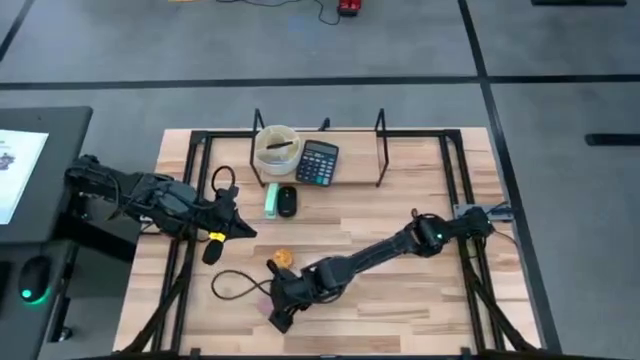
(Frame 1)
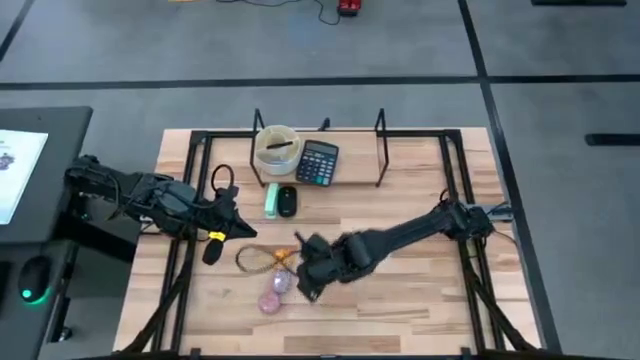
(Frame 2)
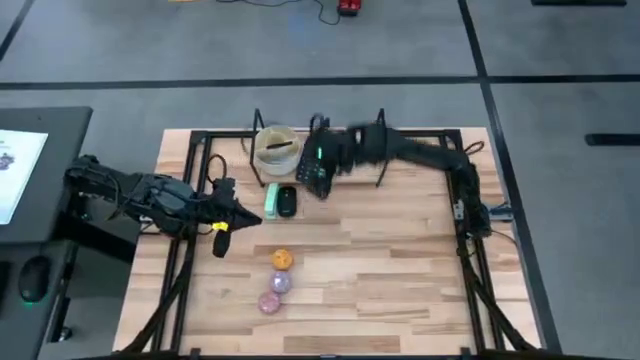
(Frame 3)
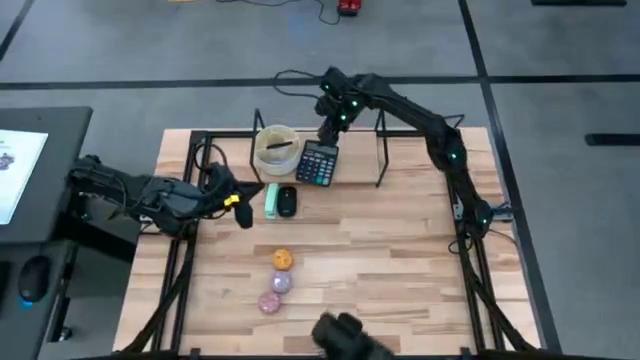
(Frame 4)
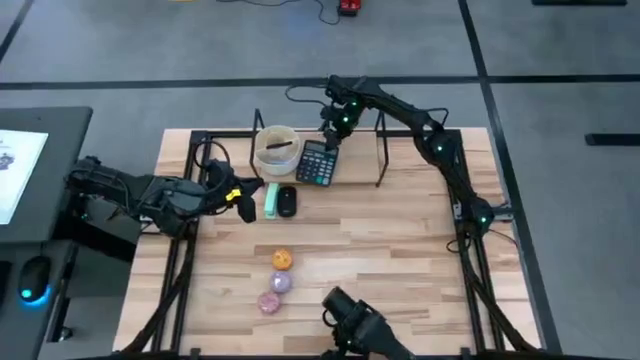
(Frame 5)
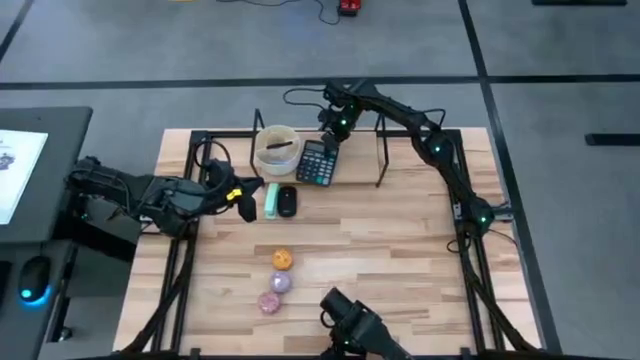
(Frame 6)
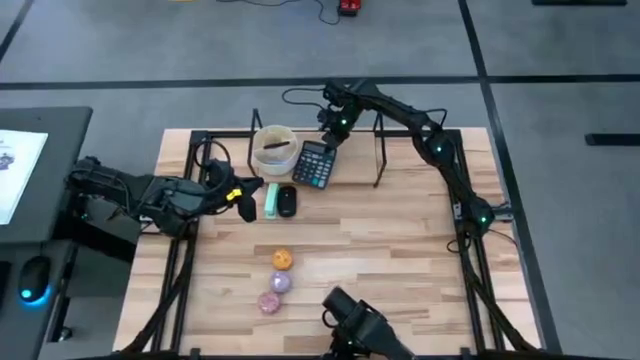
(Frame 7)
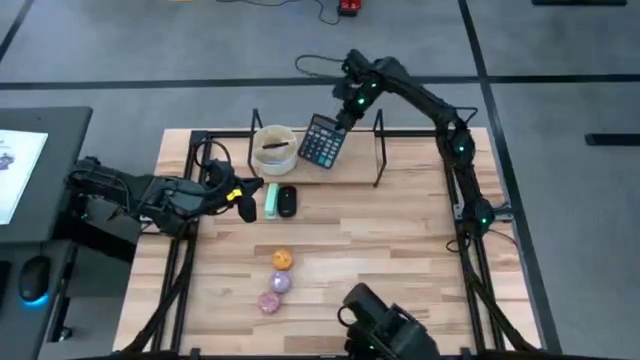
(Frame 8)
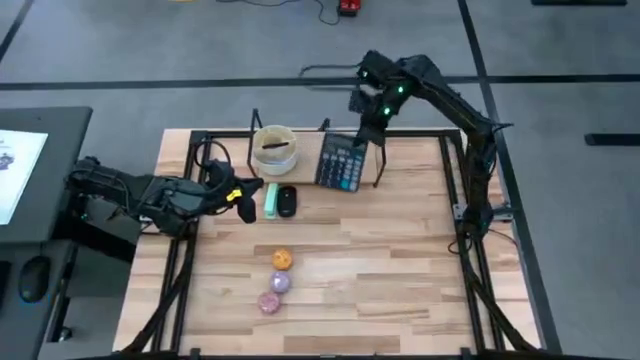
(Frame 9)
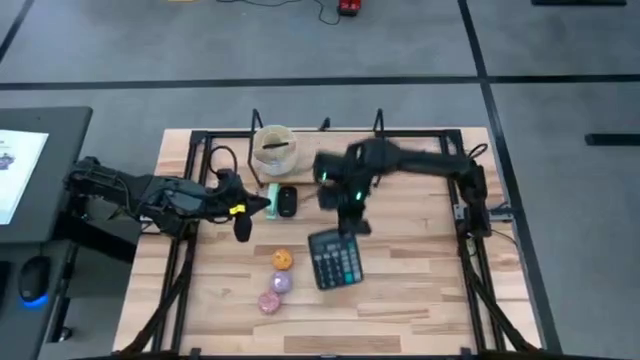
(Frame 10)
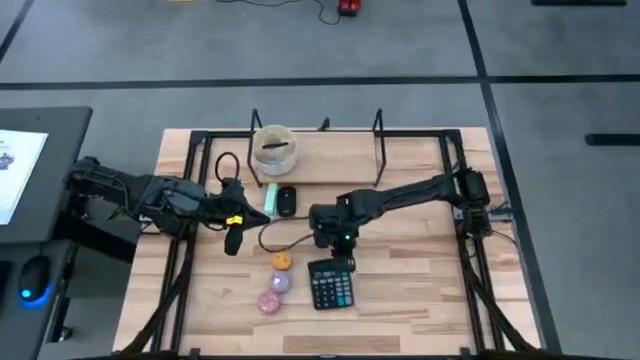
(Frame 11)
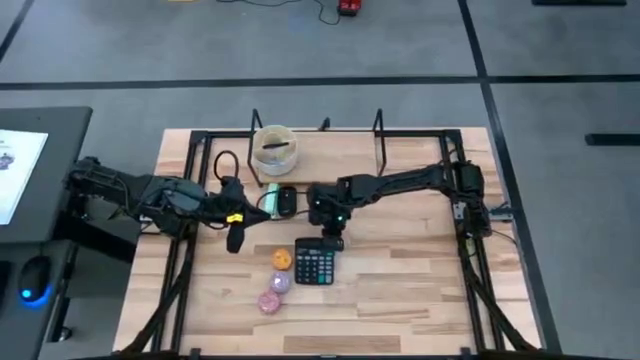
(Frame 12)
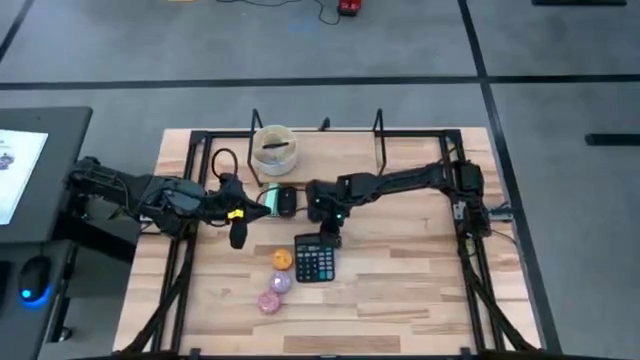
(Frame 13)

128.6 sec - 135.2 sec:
Task: Stock shelves
Remove the black calculator from the shelf

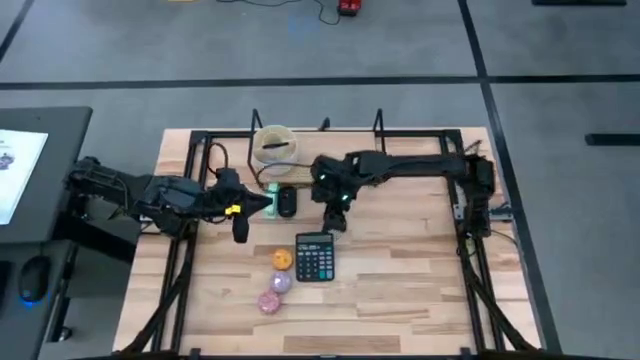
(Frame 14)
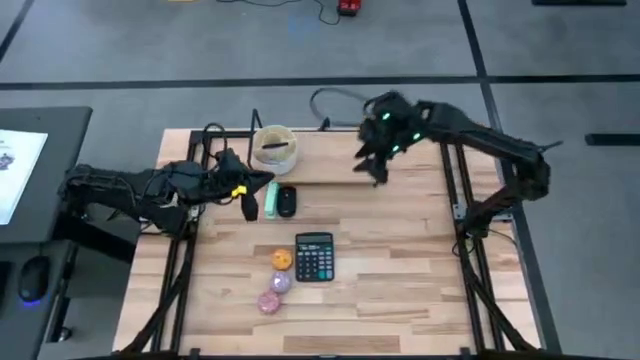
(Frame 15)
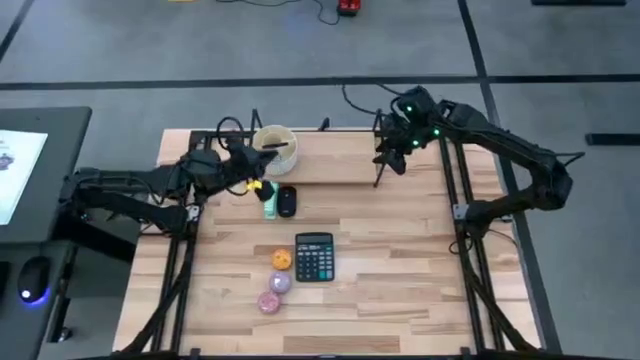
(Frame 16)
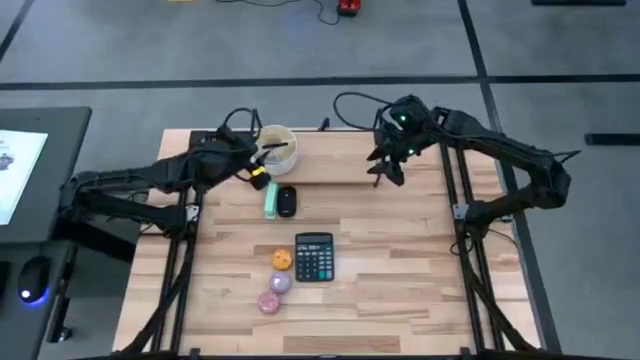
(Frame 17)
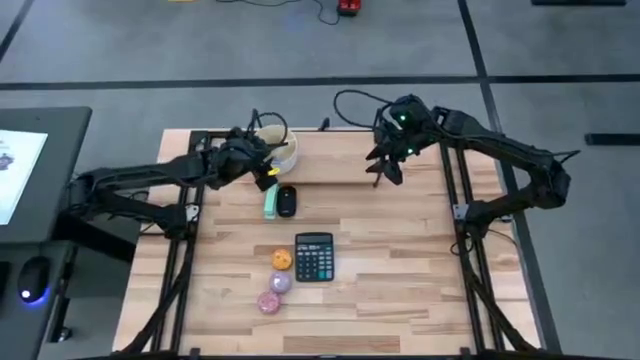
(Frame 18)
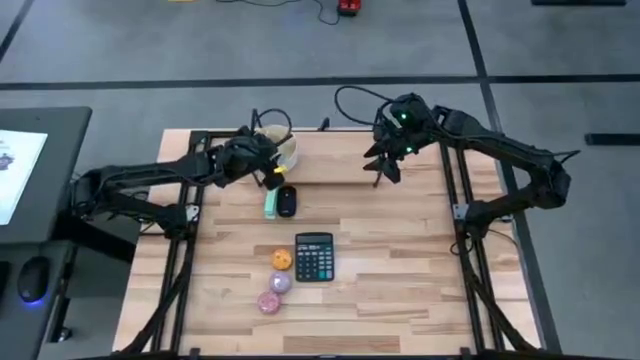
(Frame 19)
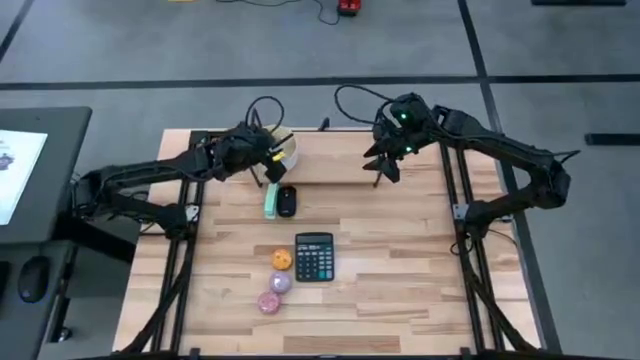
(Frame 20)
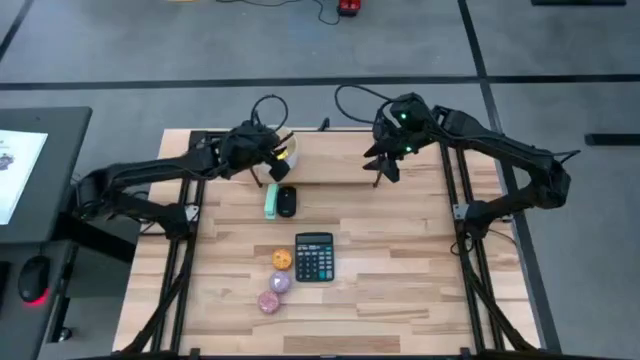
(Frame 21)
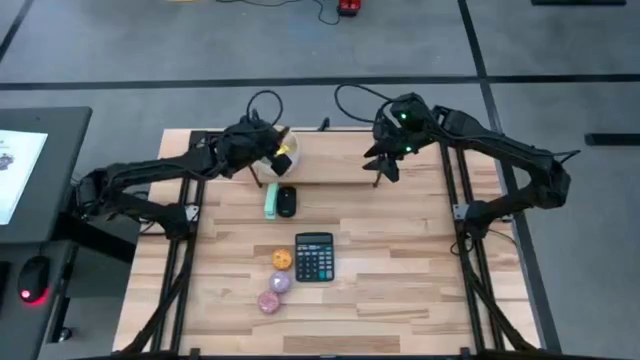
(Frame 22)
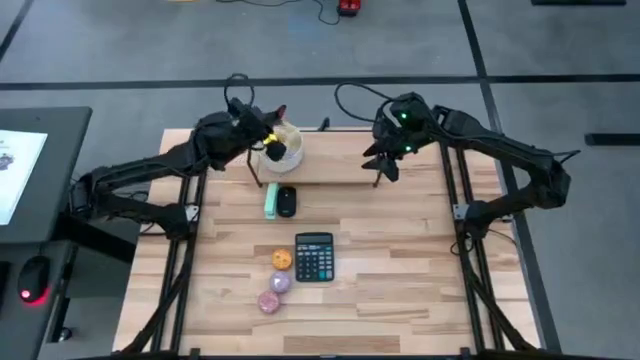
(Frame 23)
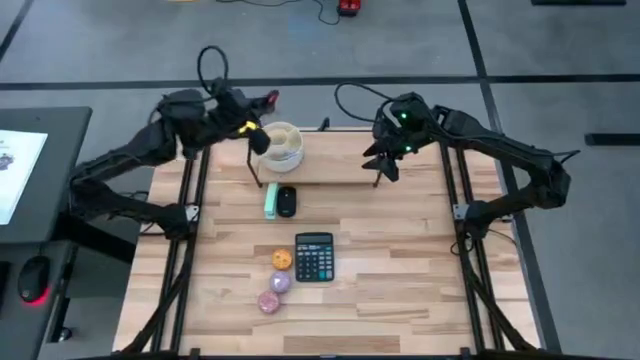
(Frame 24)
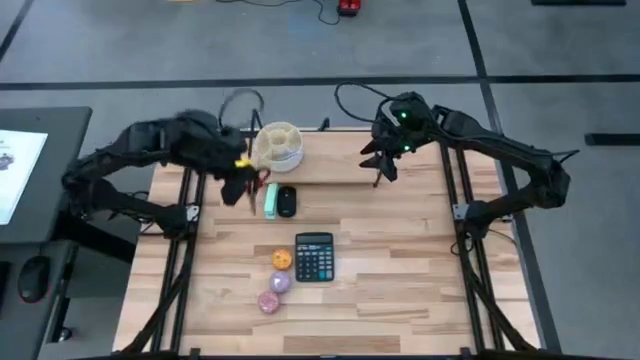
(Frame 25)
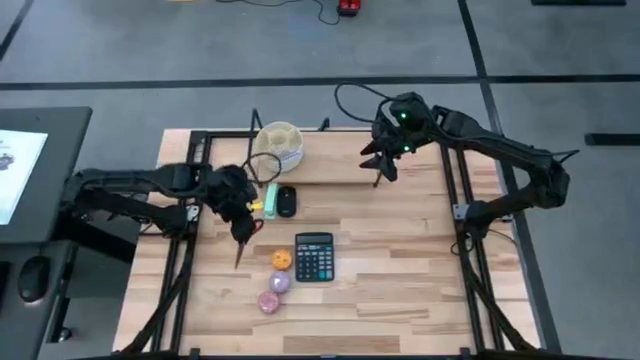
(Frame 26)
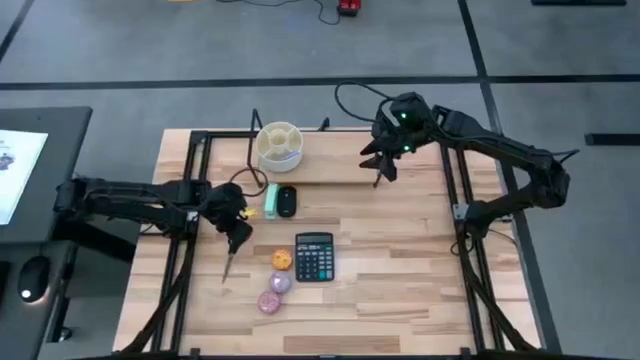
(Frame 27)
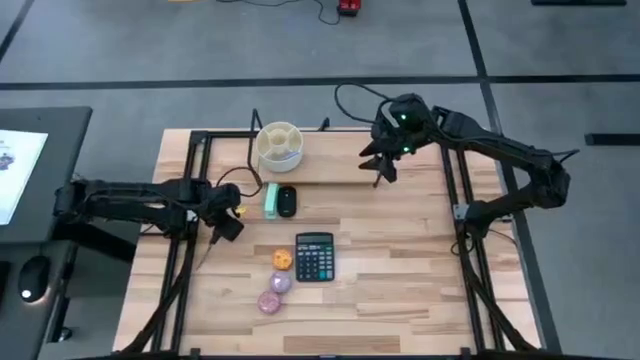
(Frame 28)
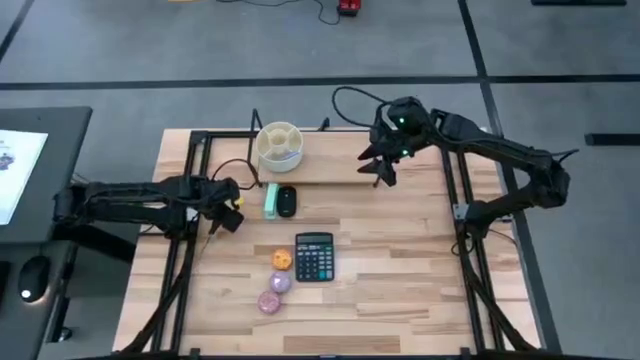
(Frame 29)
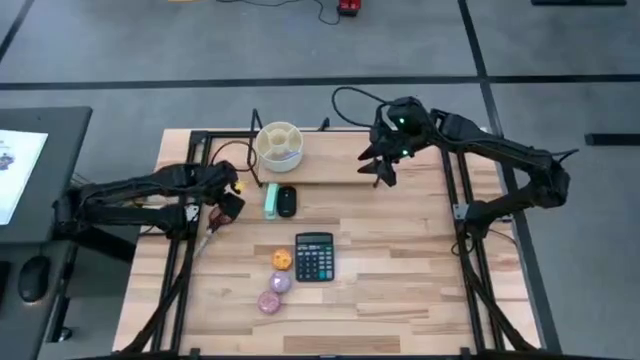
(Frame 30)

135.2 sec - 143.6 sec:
Remove the black scissors from the white pen organizer

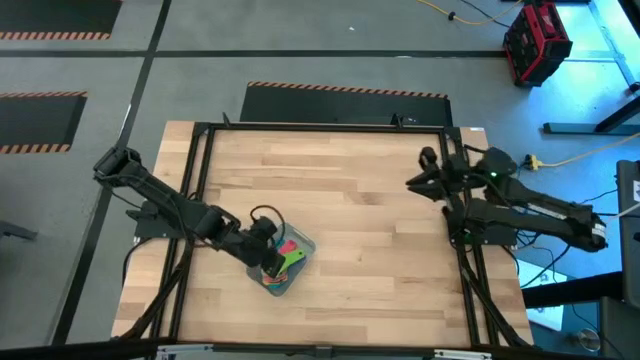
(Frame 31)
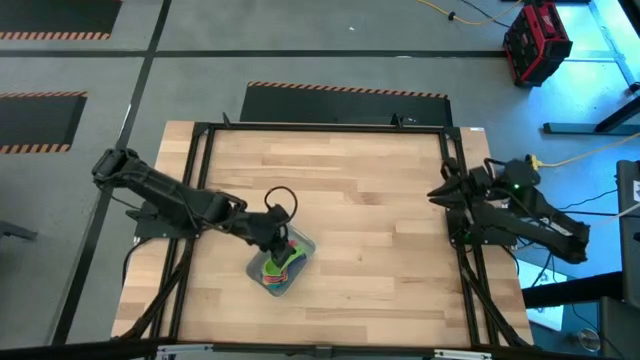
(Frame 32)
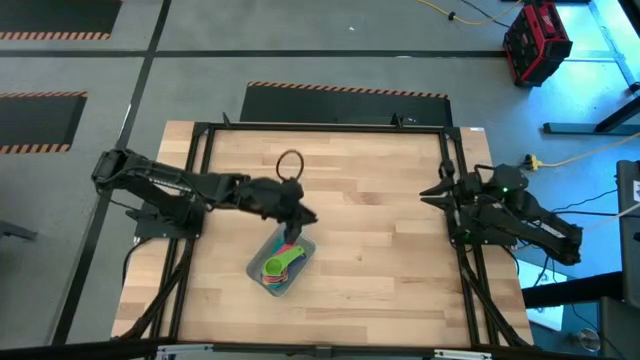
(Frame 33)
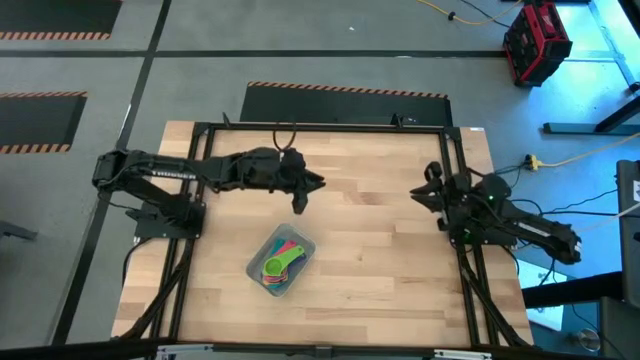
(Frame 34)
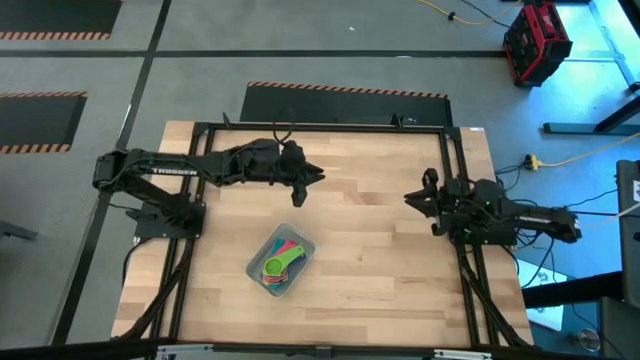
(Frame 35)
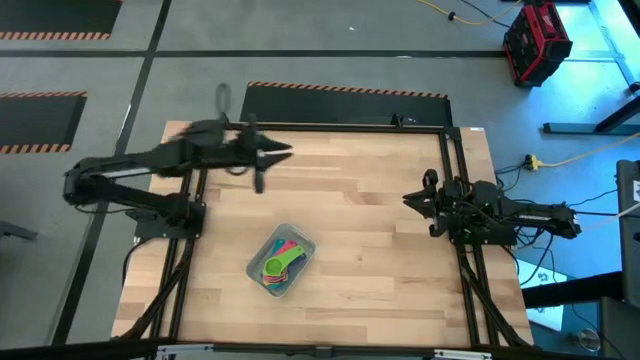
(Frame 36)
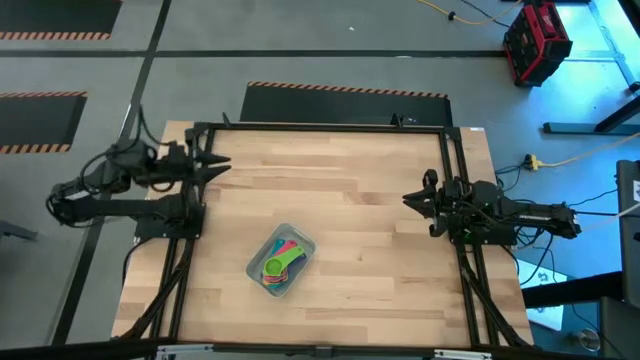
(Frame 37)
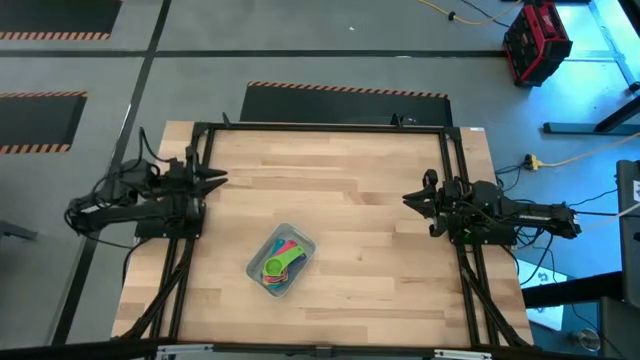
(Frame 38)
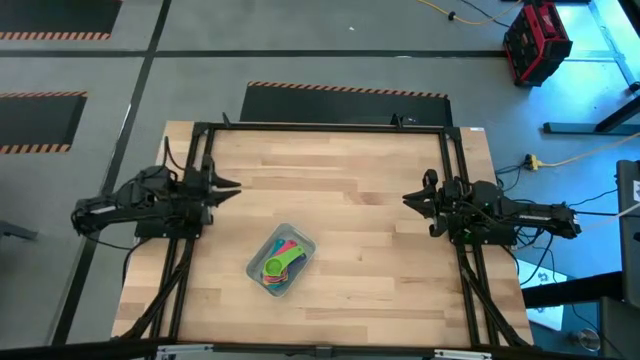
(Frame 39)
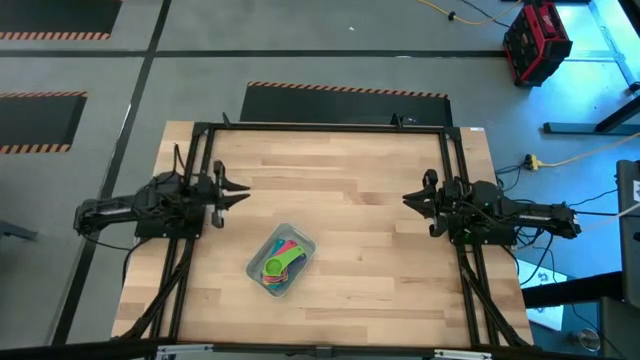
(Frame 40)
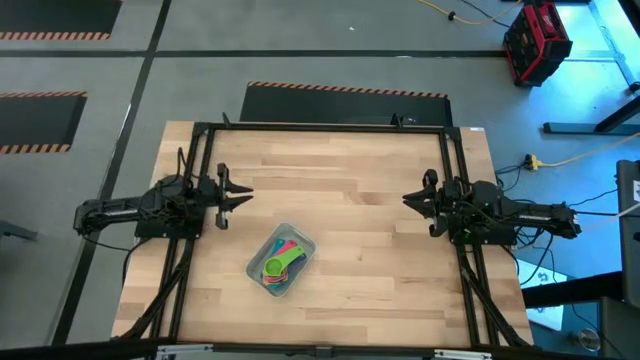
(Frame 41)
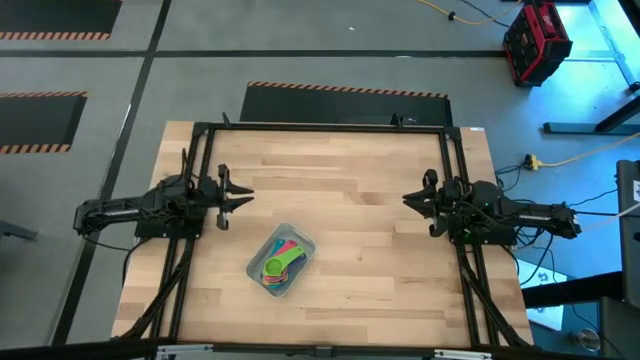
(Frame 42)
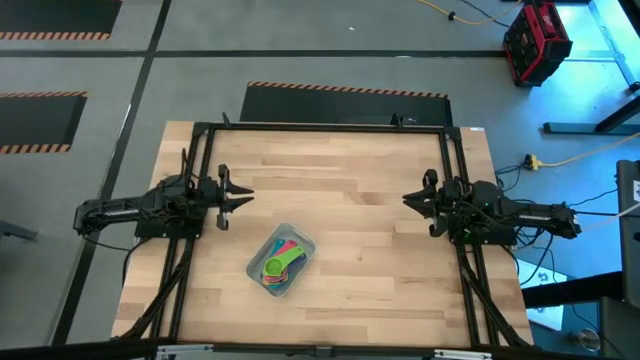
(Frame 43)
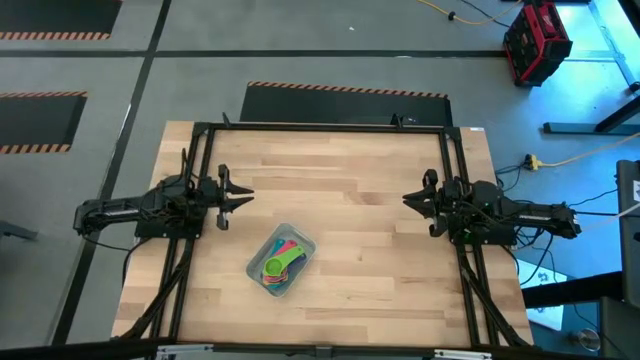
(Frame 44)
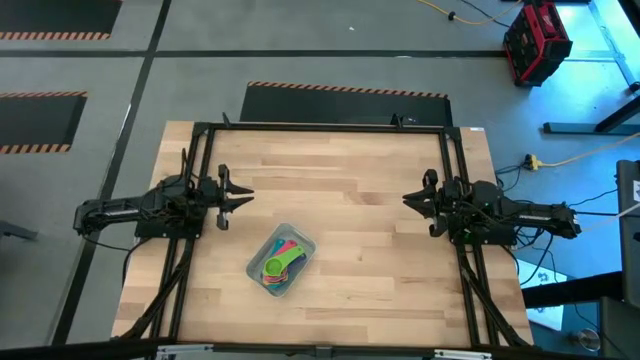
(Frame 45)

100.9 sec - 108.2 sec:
Task: Nest measuring cups in basket
Return to Home Position
